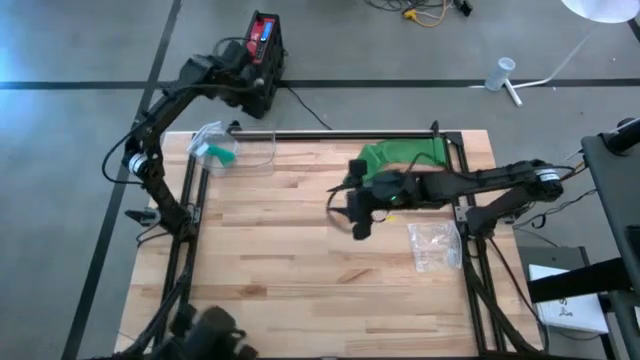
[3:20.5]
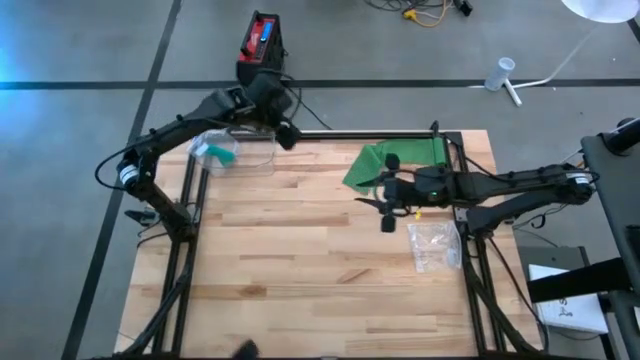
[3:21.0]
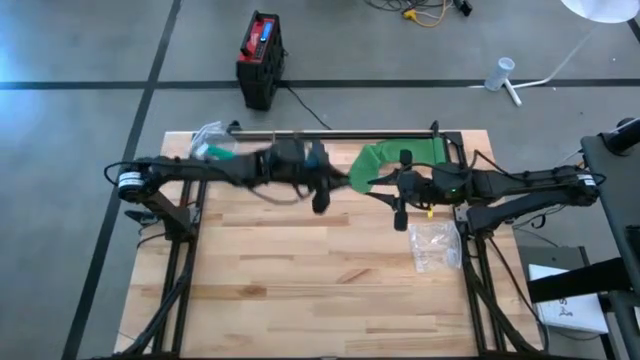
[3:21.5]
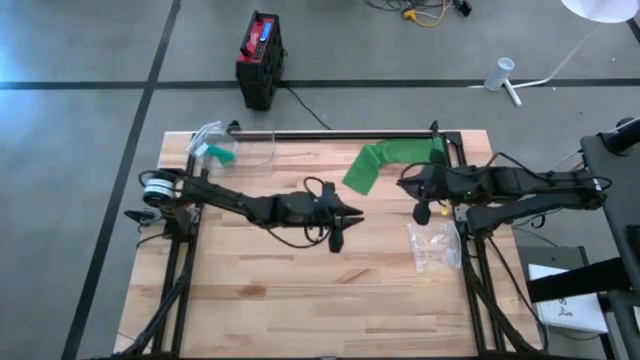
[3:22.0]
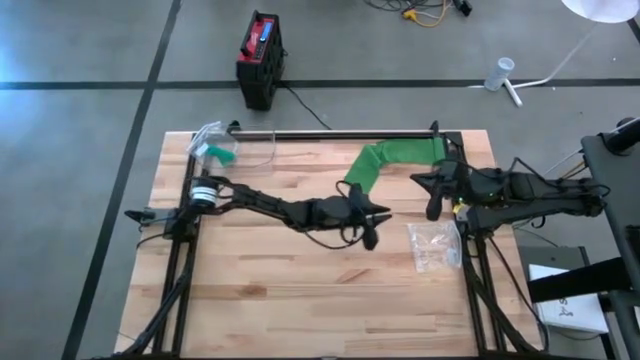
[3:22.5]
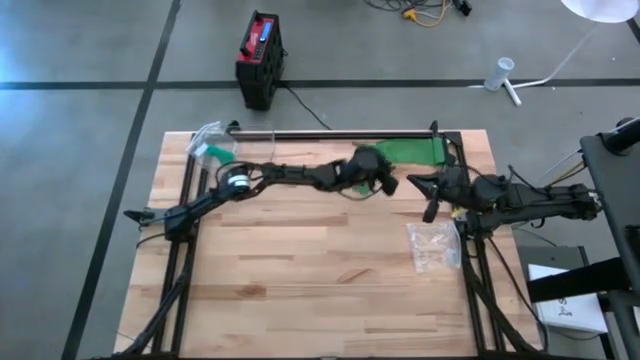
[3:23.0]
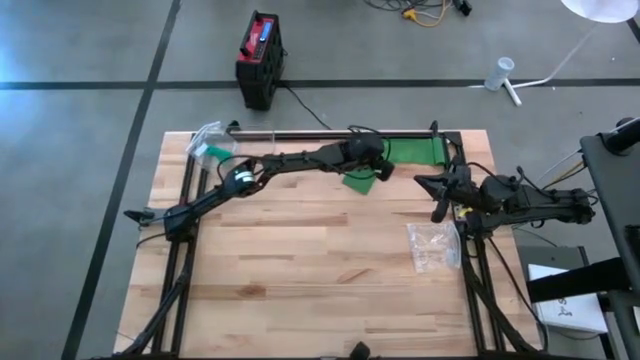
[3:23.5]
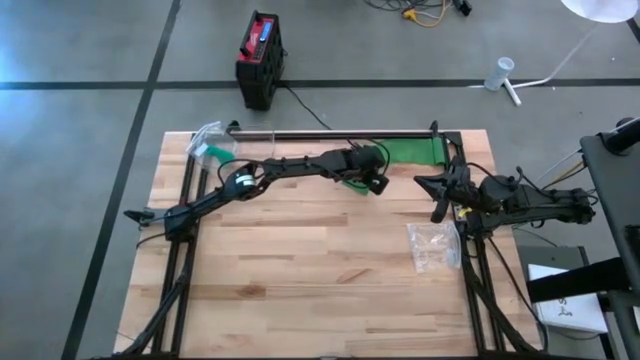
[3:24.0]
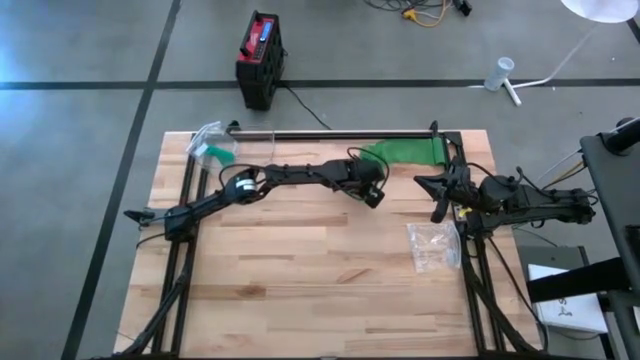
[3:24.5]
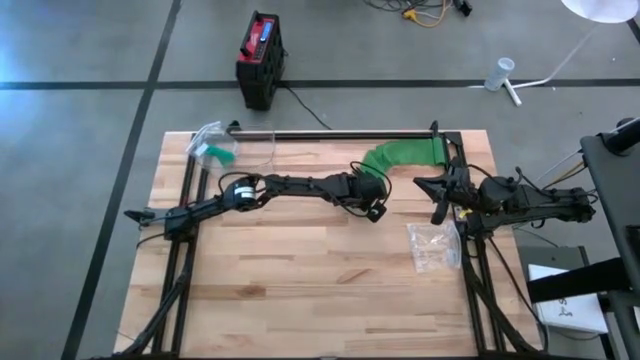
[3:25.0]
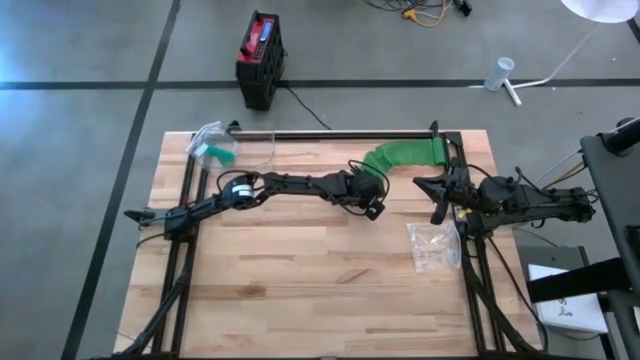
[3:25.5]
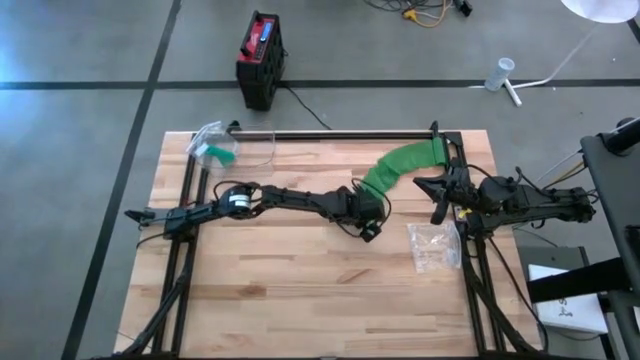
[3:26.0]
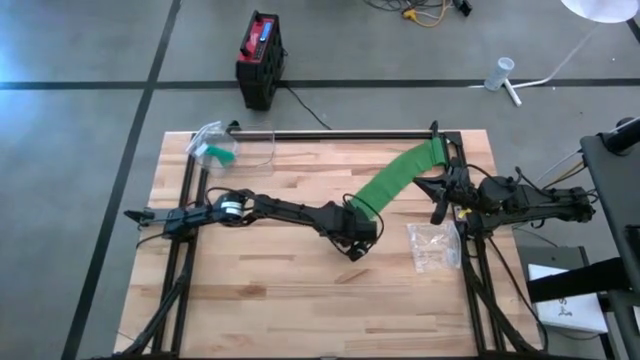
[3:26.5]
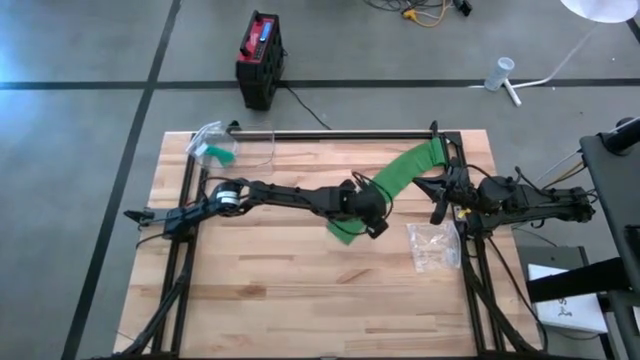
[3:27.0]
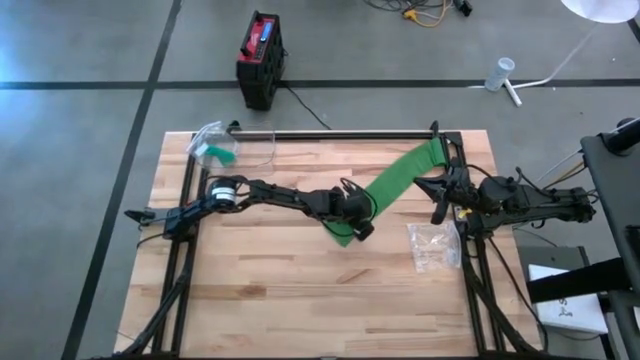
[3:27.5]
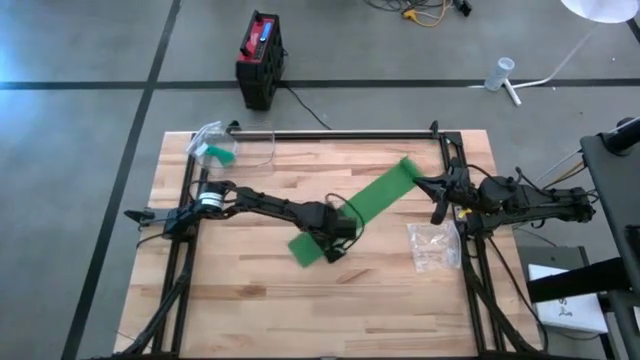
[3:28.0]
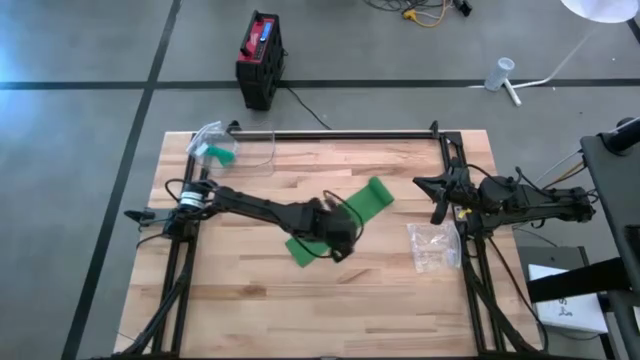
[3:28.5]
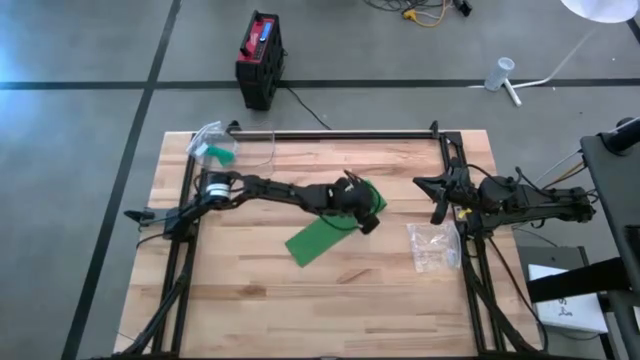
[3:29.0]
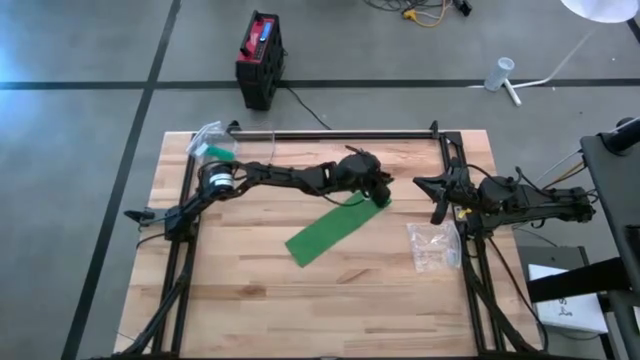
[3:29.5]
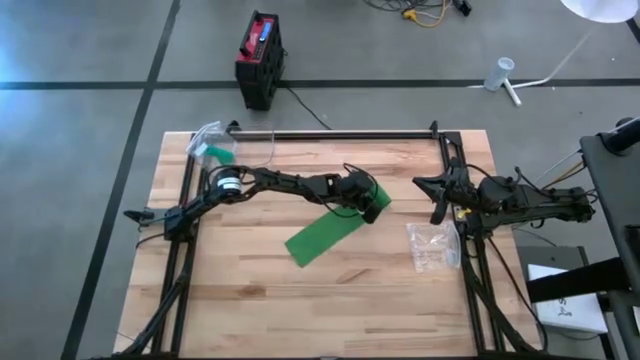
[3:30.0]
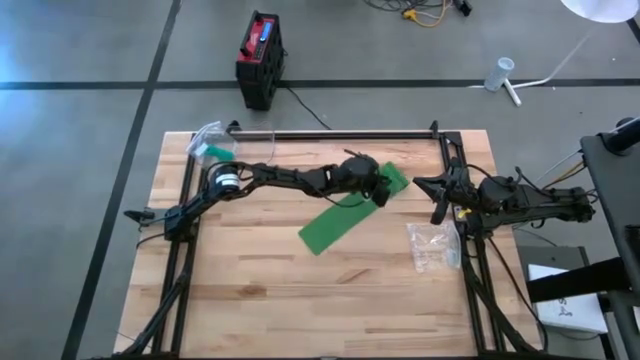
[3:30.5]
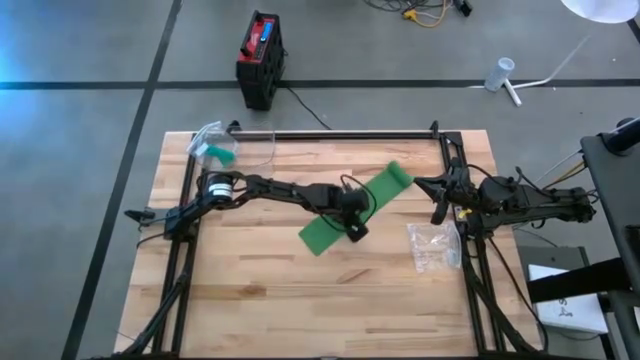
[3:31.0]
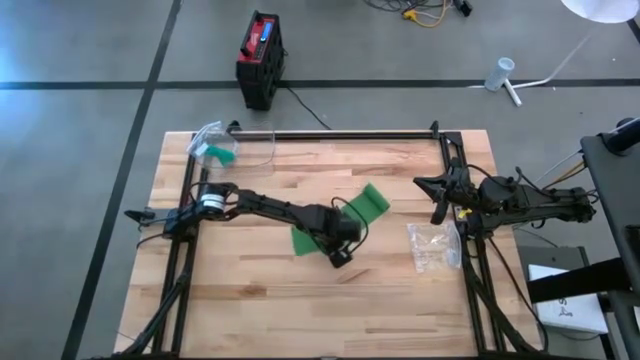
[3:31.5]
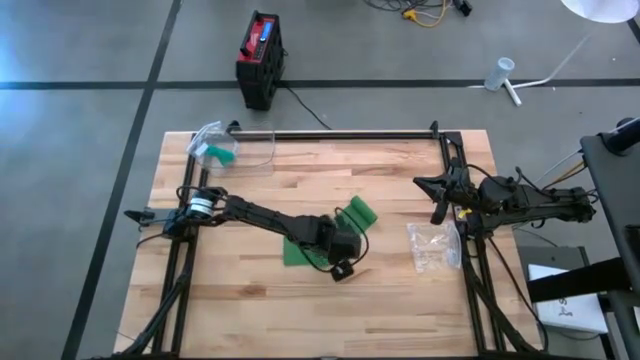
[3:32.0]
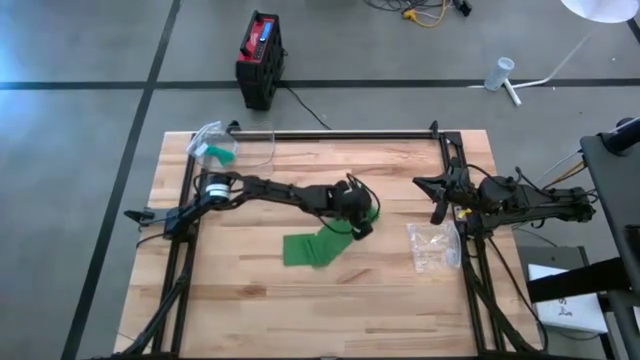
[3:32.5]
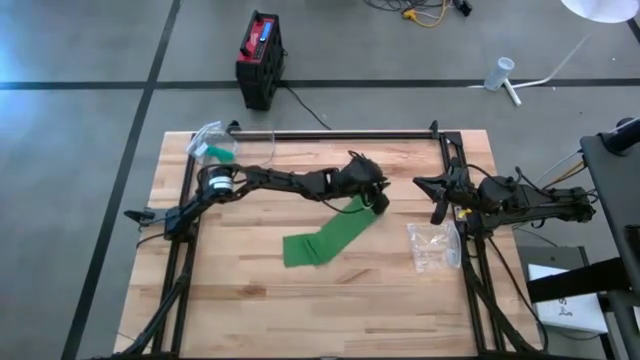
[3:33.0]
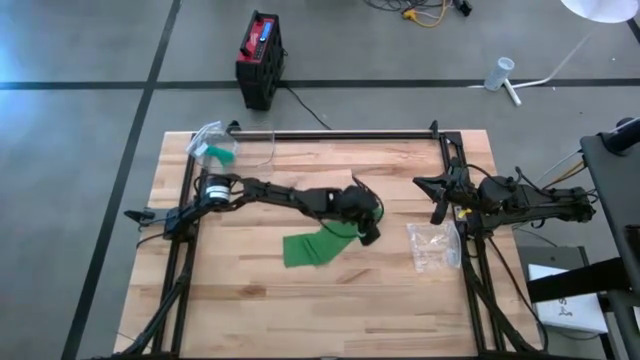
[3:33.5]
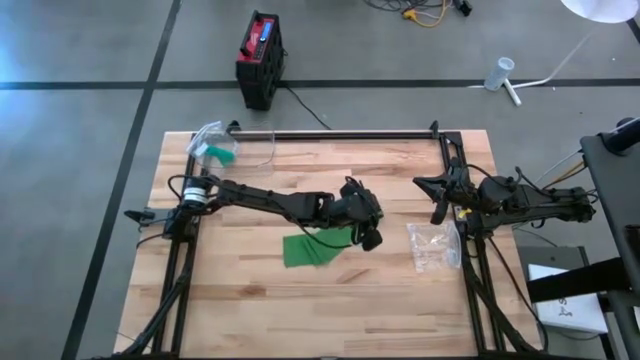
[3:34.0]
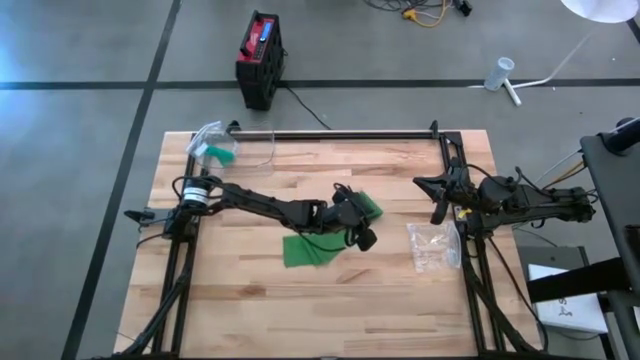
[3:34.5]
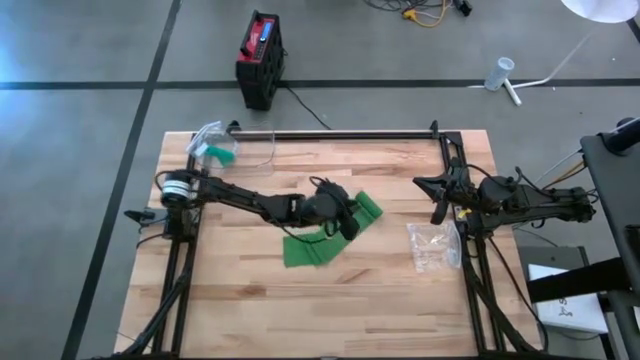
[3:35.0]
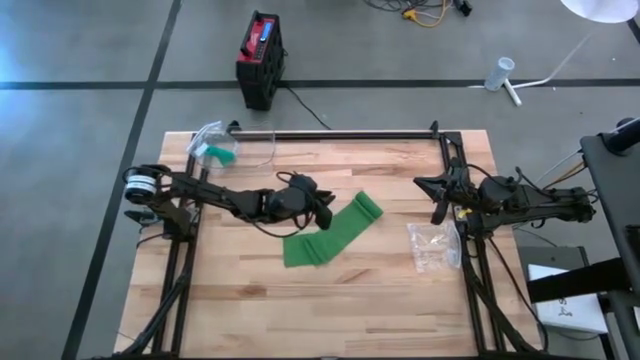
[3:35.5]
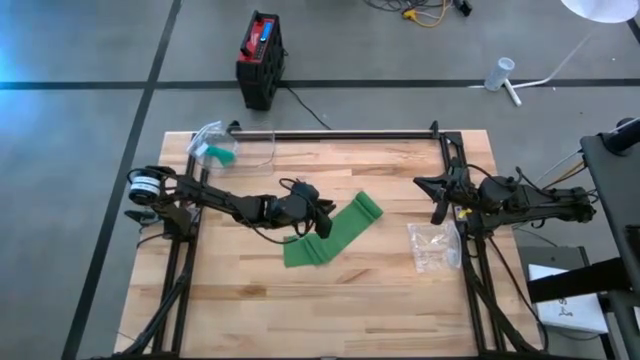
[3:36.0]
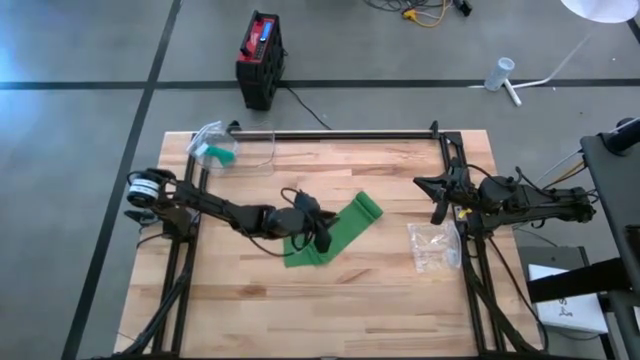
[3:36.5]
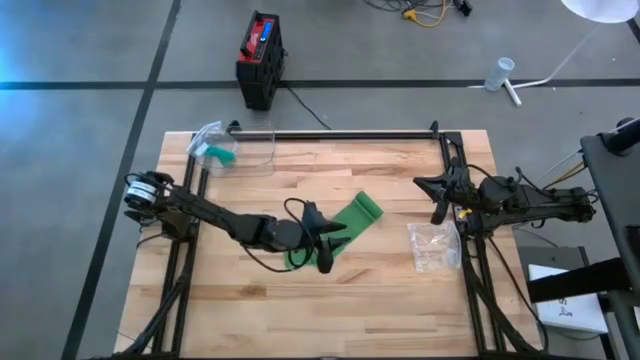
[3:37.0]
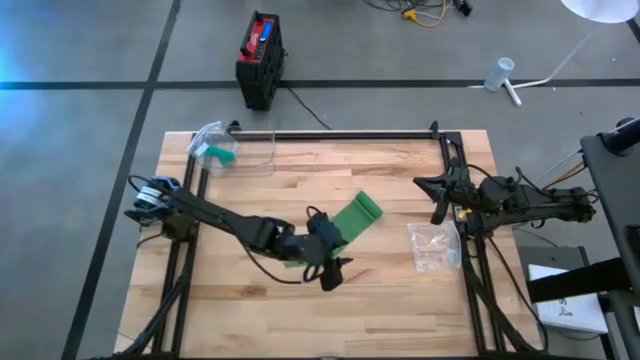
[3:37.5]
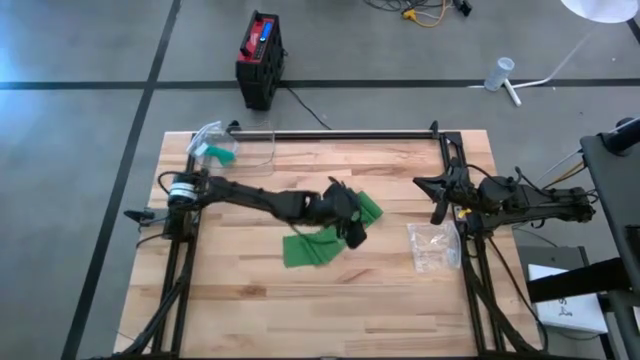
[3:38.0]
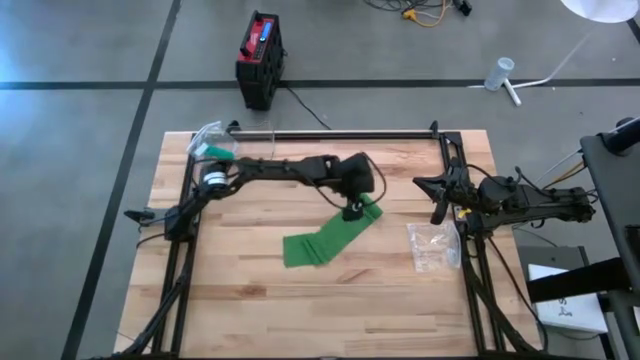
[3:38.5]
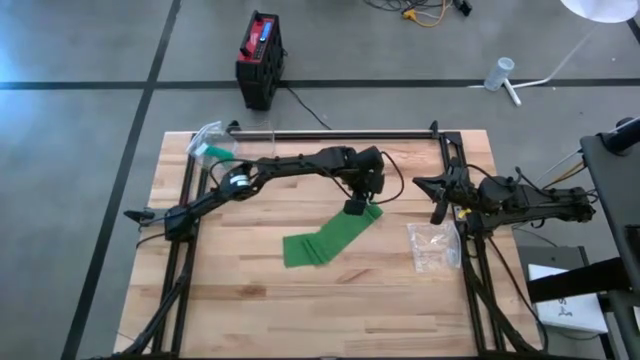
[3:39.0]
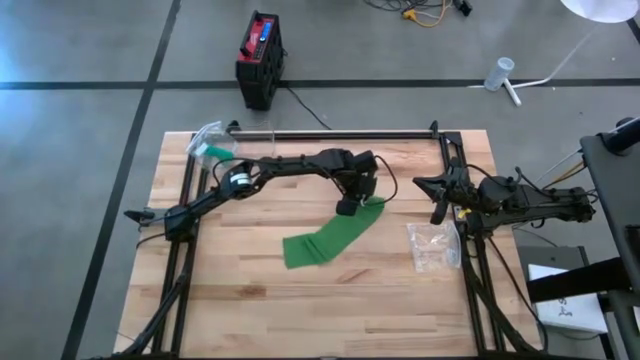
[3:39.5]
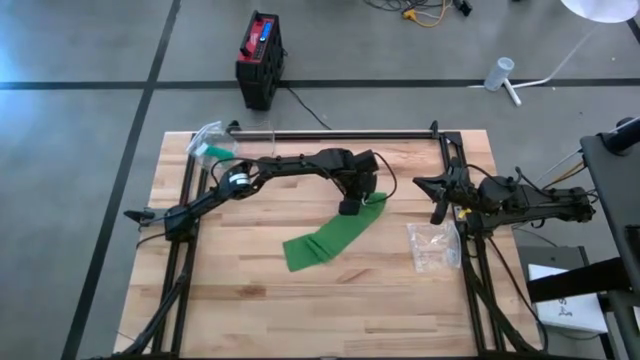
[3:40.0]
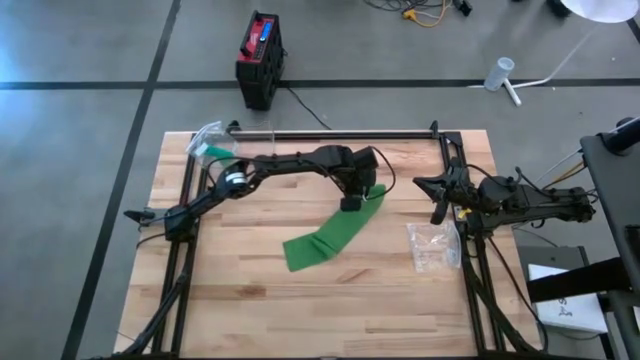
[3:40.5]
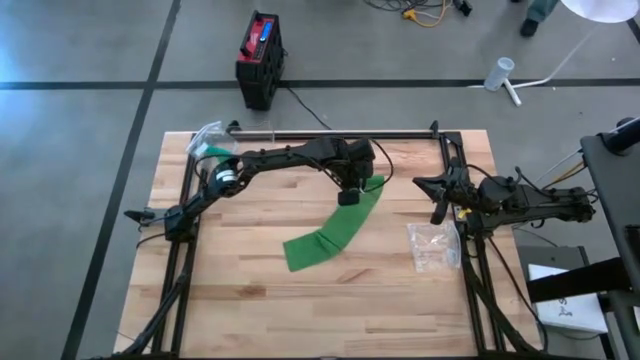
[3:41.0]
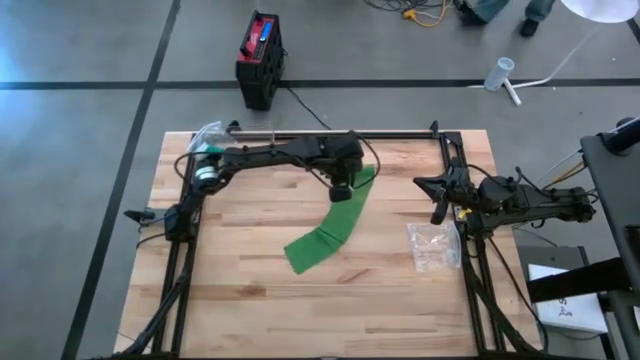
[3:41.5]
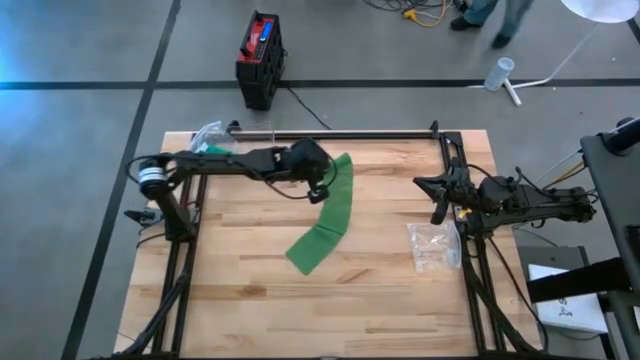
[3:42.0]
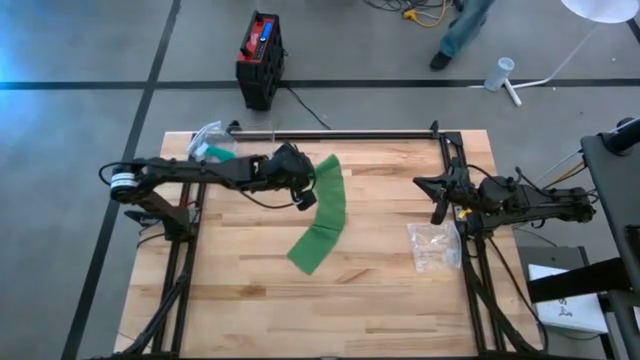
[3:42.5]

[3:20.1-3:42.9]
Task: Roll bandage
Roll the green bandage
